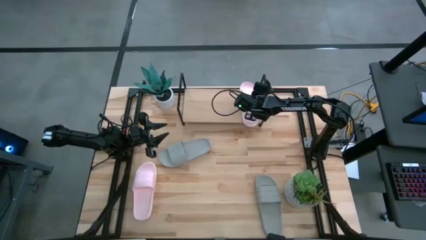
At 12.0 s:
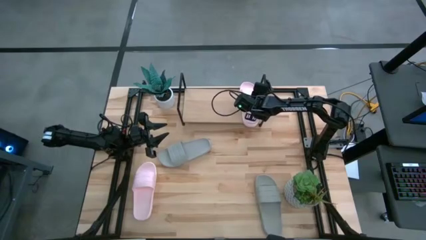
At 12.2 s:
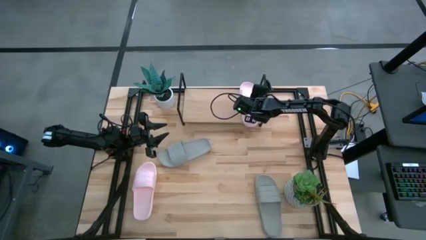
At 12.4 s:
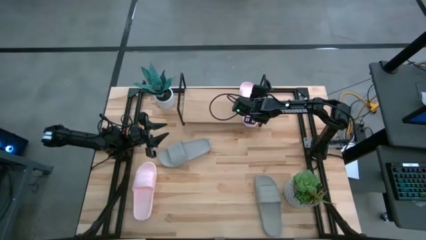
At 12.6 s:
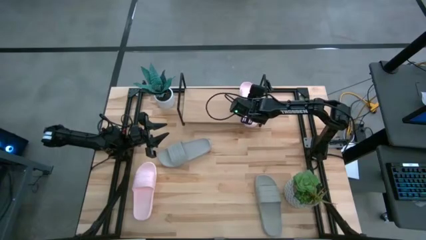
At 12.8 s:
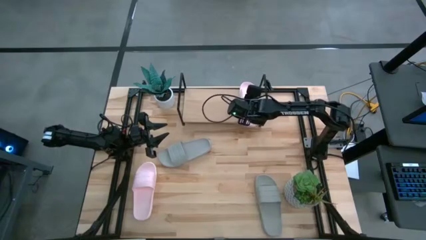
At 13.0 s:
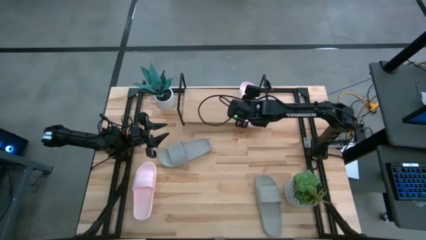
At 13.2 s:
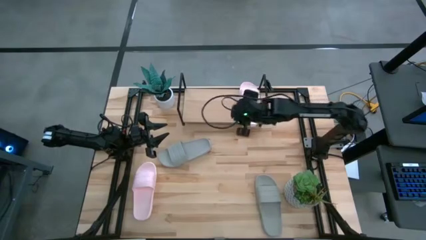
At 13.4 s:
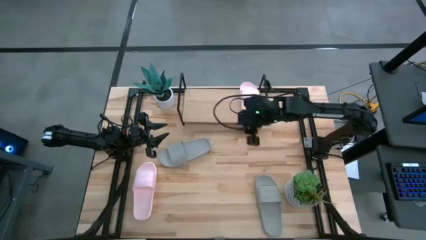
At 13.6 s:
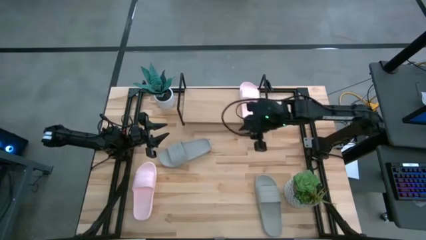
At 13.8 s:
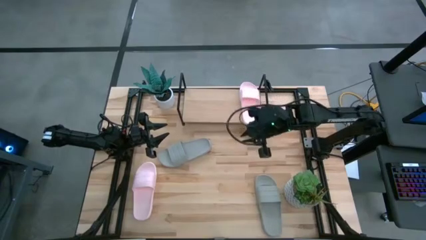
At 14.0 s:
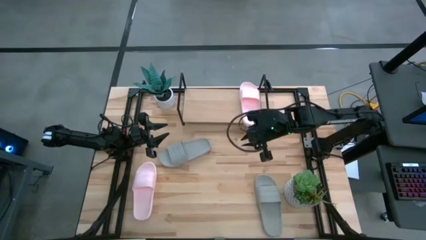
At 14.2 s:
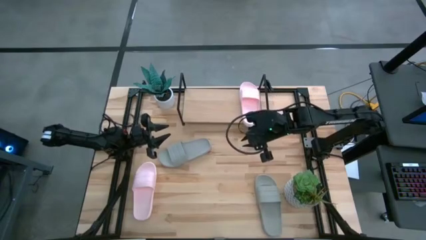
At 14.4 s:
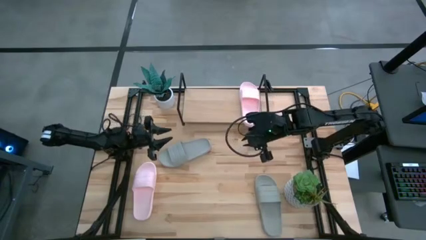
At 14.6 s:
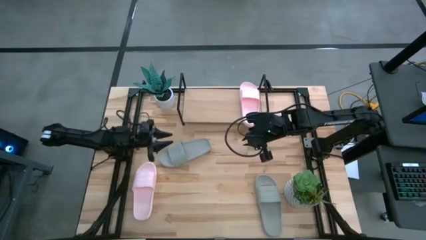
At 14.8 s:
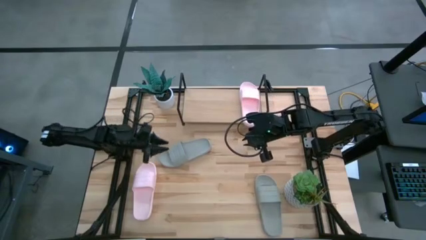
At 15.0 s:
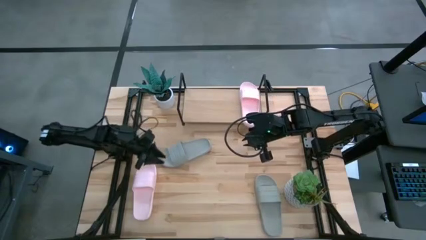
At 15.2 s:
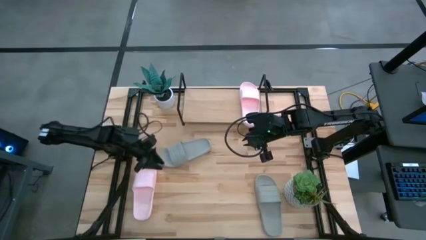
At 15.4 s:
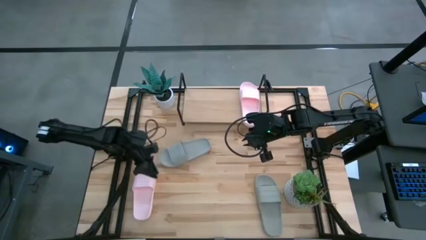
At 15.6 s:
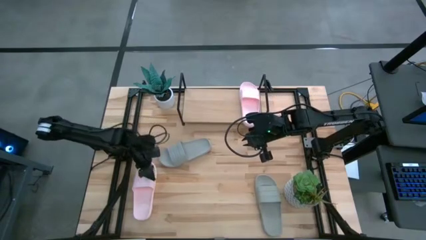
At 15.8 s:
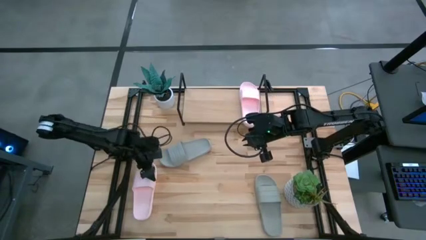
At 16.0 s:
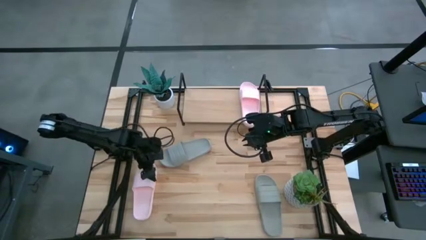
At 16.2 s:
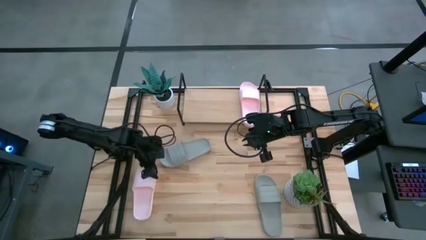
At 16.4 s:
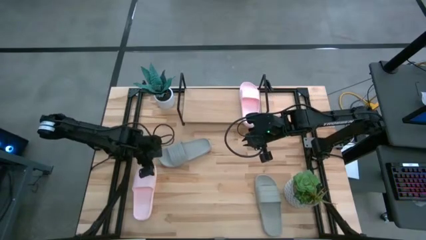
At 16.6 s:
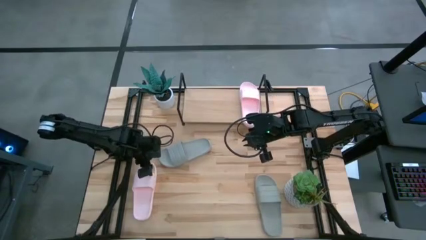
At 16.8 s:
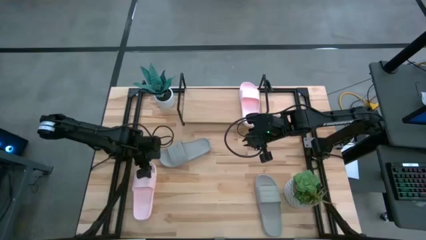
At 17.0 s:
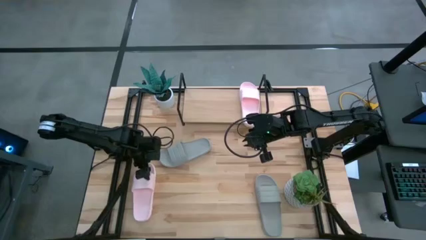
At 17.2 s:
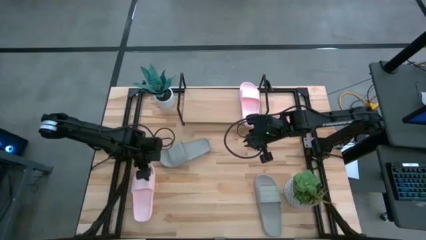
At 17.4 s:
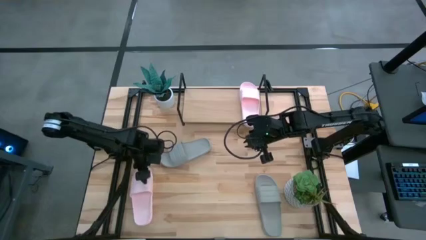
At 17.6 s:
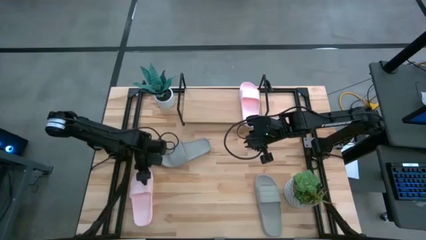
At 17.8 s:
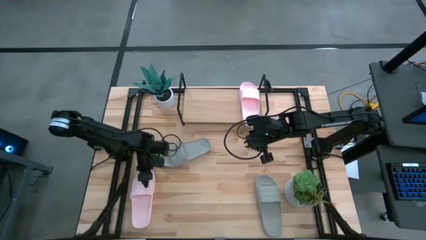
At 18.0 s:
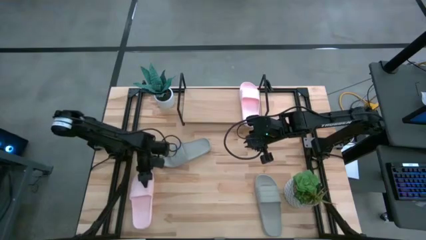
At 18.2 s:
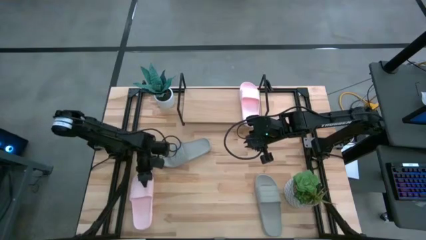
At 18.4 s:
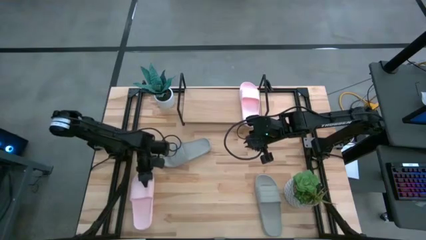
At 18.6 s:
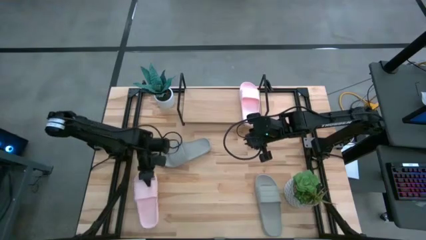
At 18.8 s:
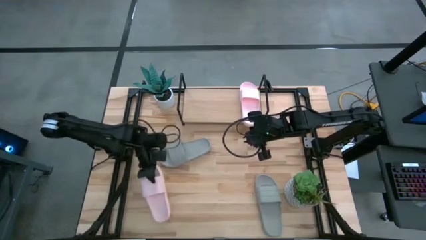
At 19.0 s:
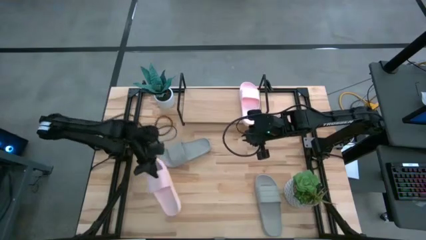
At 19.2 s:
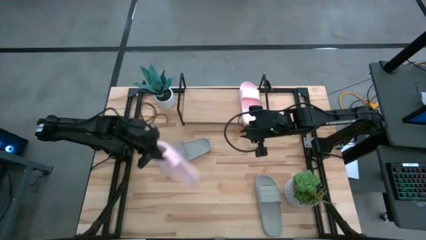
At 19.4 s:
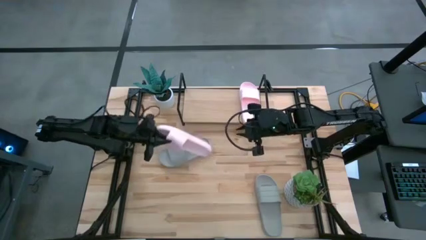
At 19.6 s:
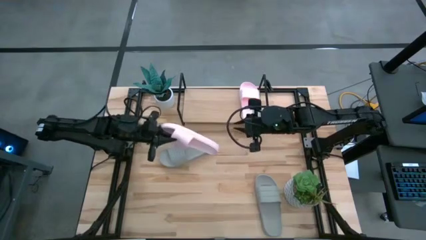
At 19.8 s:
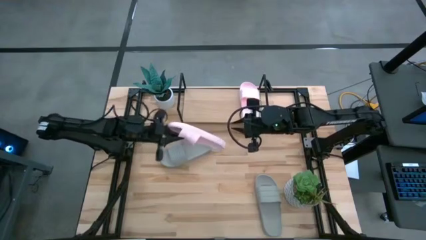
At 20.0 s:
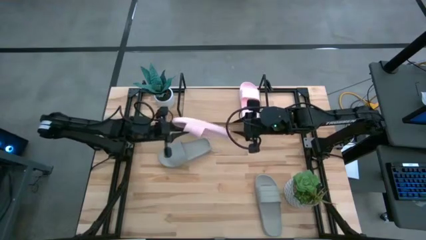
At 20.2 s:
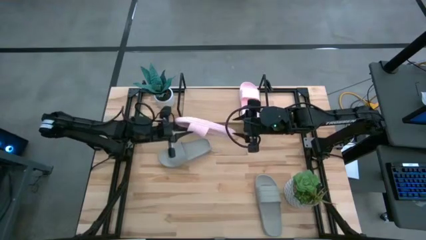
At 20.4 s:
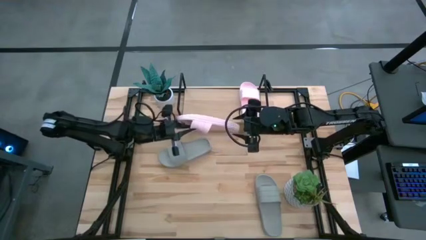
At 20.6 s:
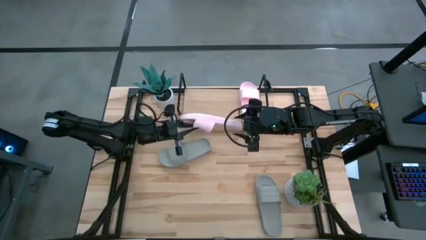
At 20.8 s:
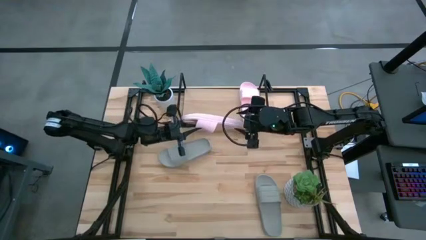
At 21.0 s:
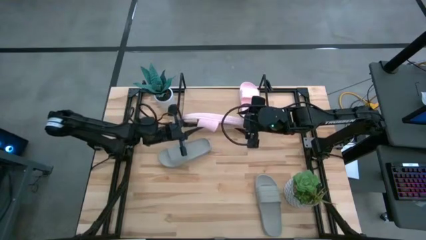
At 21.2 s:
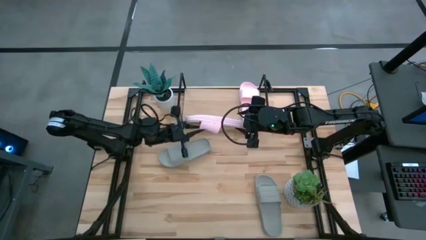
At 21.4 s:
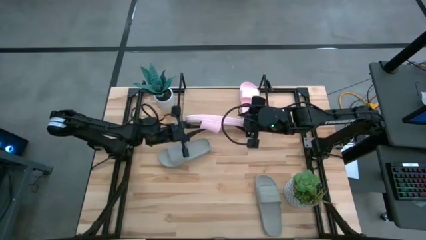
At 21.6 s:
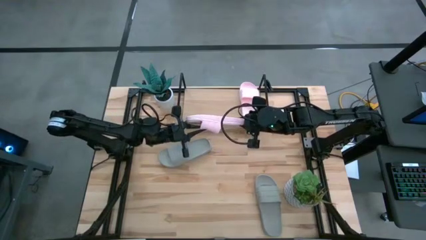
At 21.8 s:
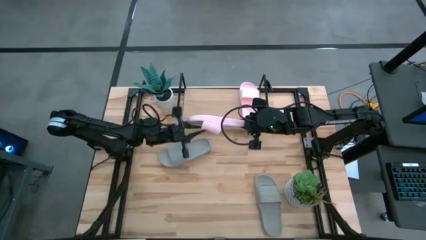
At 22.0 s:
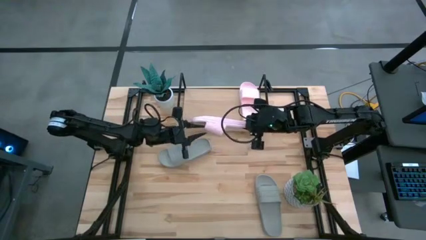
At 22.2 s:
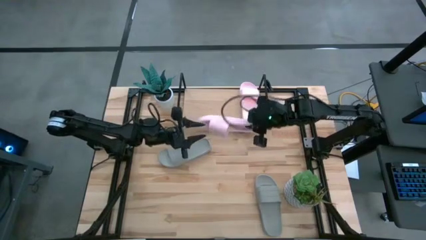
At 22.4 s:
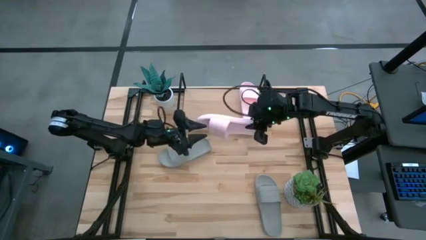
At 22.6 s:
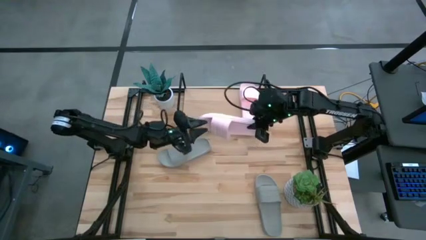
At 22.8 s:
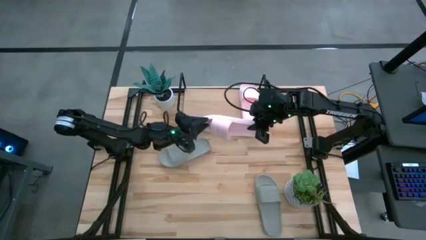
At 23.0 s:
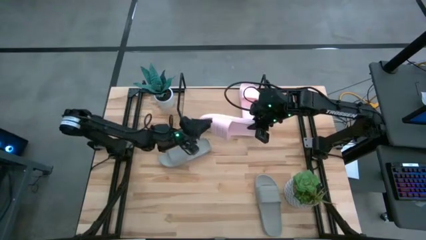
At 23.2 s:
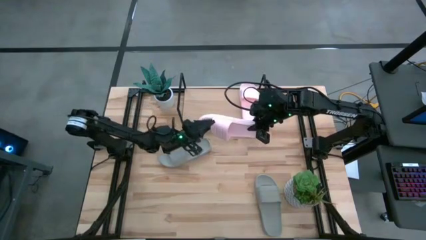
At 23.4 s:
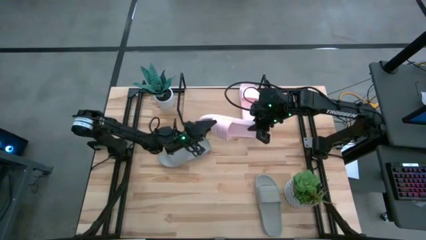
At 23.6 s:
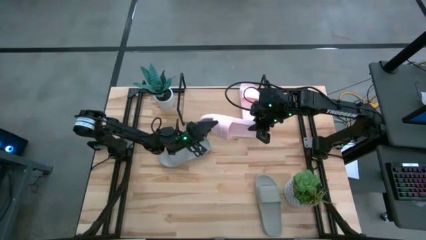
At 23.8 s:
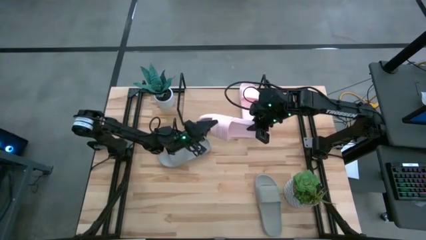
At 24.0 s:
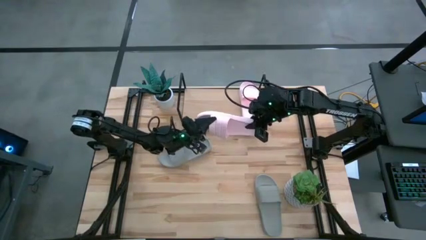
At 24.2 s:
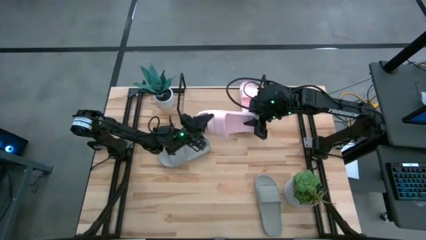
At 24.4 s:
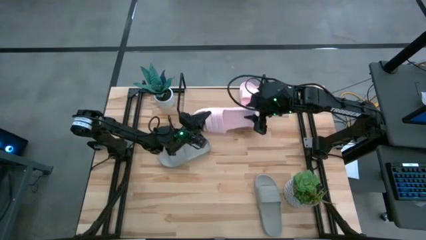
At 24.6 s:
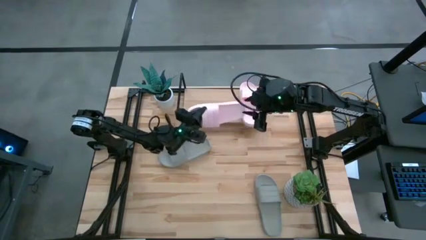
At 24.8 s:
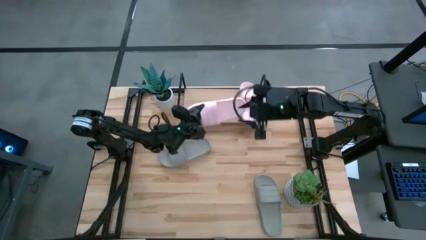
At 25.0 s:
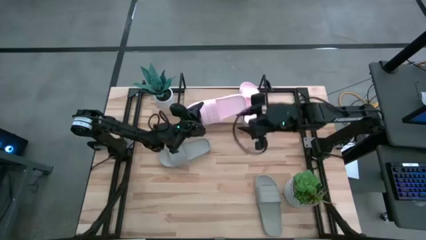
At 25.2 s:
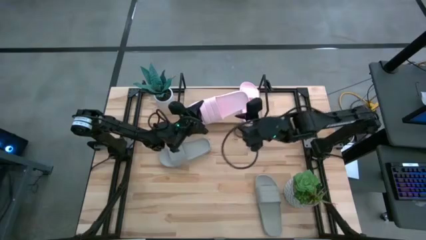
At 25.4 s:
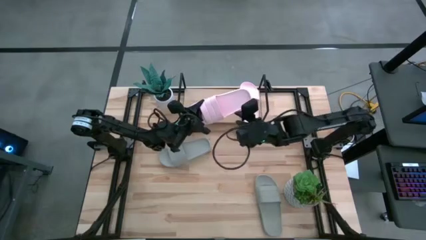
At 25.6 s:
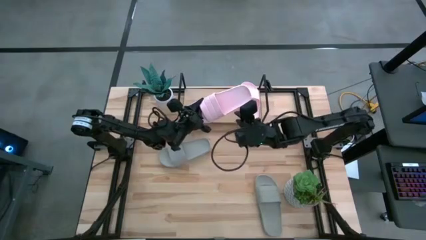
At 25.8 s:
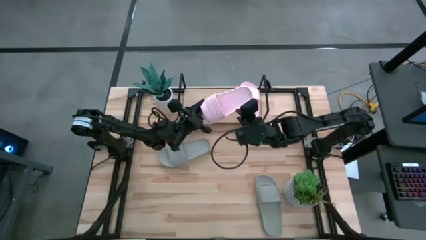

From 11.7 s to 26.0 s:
Task: Pick and place slides into the shelf
Put the pink slide on the shelf
